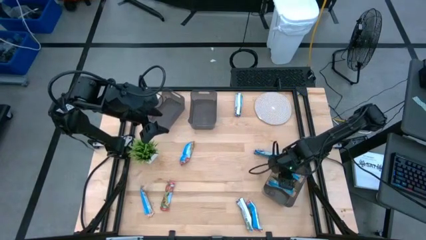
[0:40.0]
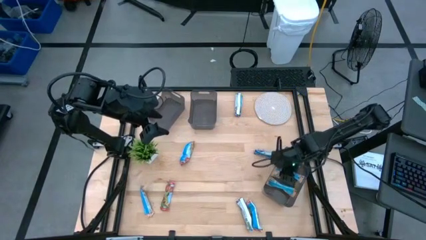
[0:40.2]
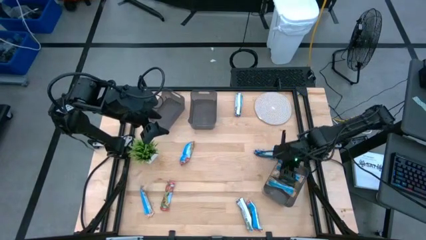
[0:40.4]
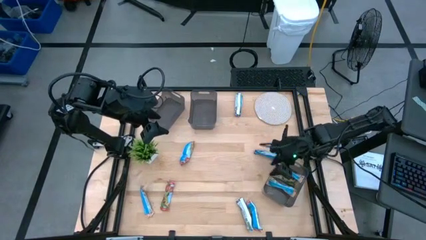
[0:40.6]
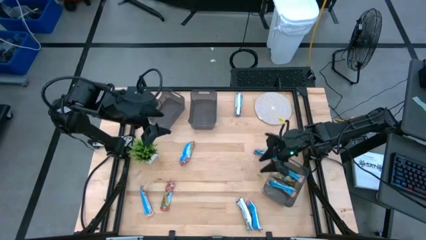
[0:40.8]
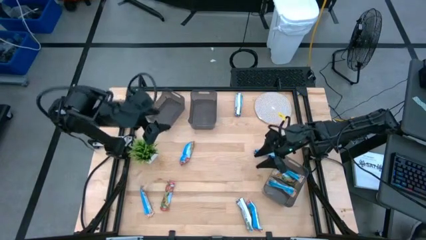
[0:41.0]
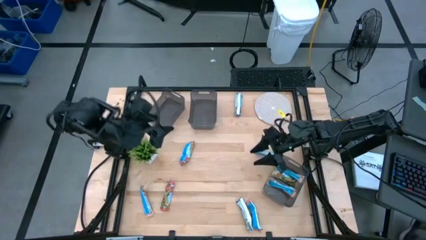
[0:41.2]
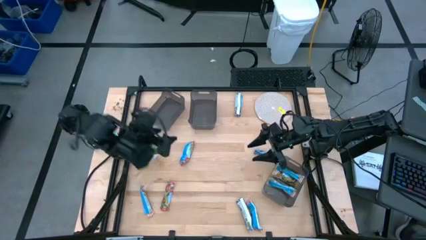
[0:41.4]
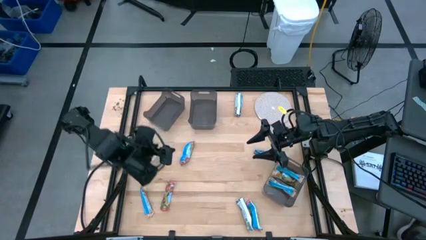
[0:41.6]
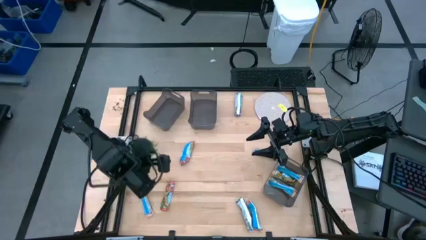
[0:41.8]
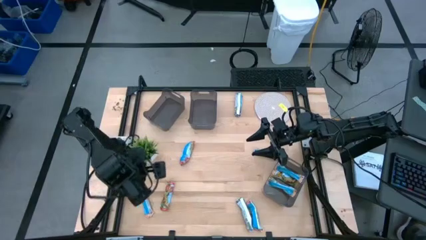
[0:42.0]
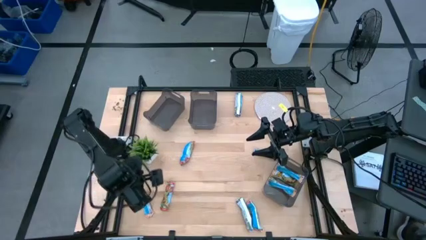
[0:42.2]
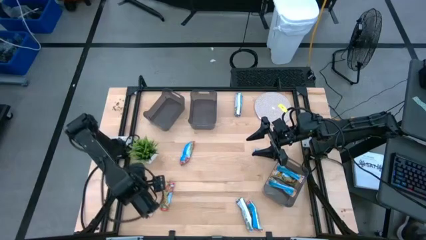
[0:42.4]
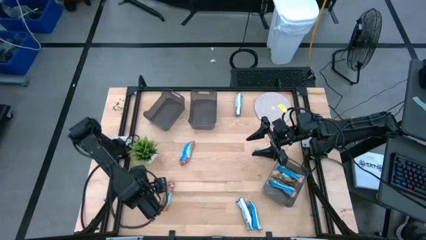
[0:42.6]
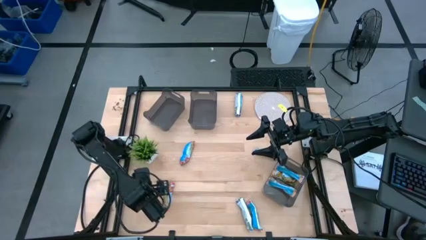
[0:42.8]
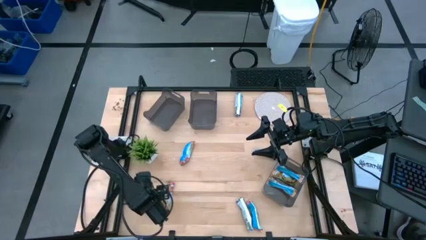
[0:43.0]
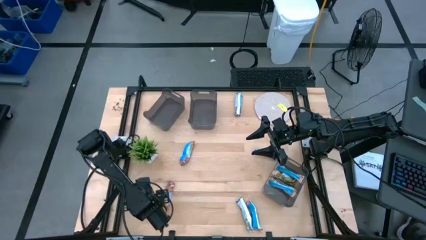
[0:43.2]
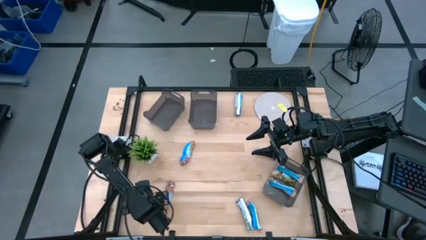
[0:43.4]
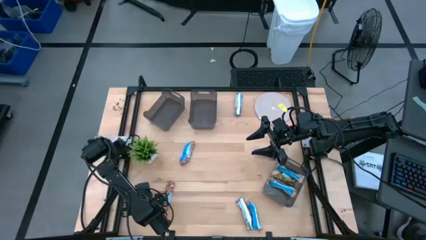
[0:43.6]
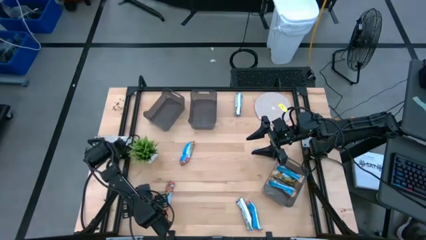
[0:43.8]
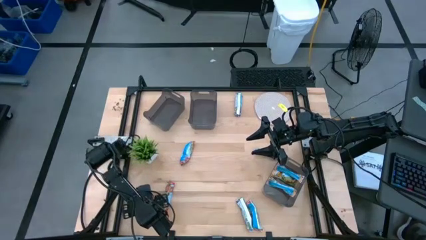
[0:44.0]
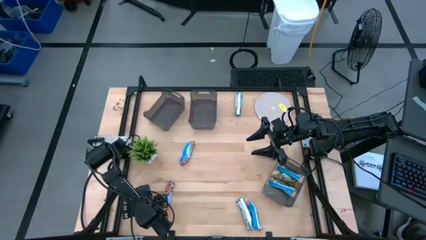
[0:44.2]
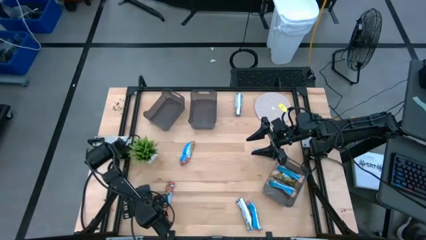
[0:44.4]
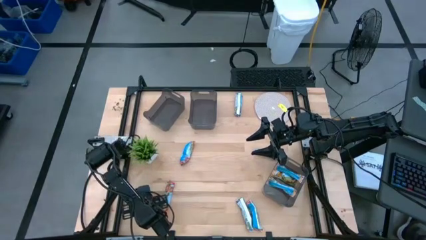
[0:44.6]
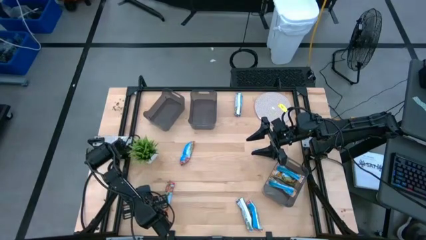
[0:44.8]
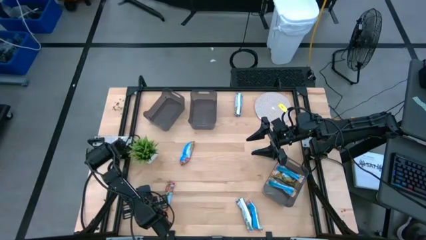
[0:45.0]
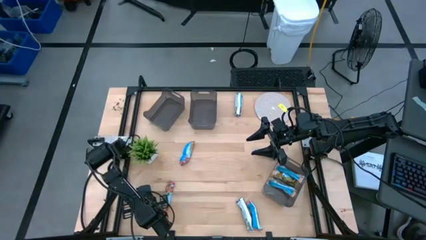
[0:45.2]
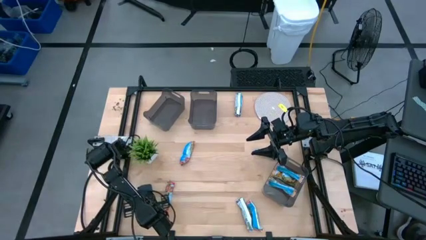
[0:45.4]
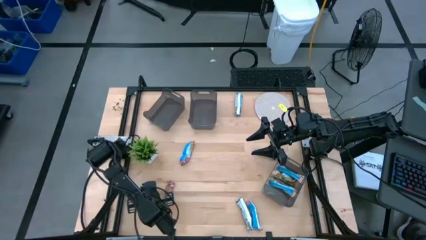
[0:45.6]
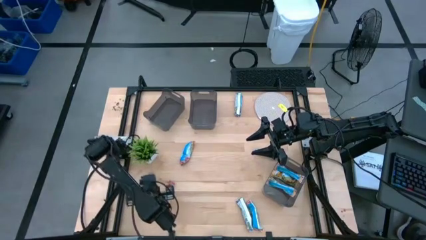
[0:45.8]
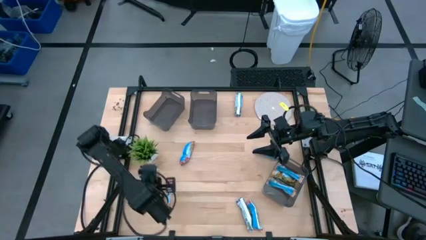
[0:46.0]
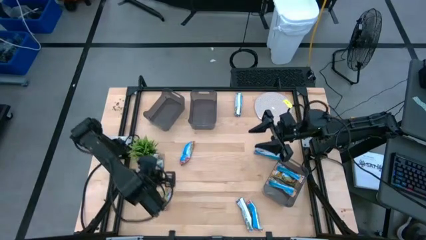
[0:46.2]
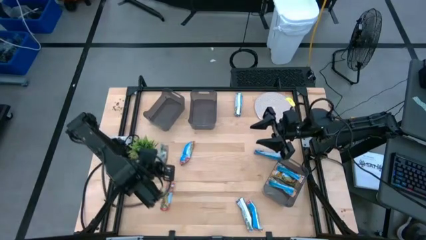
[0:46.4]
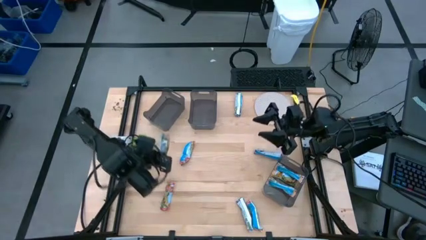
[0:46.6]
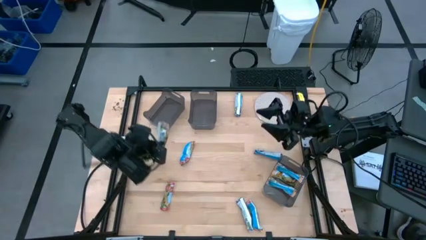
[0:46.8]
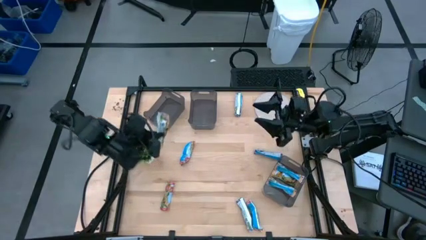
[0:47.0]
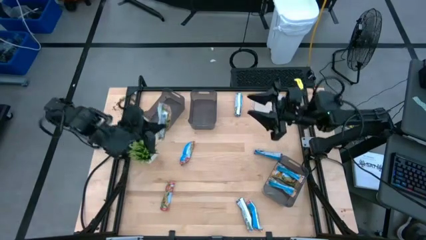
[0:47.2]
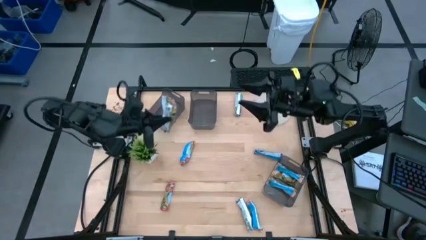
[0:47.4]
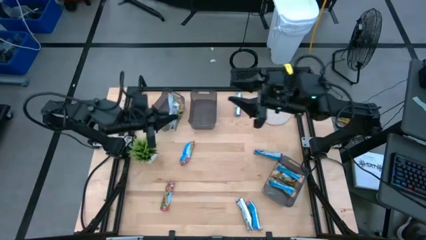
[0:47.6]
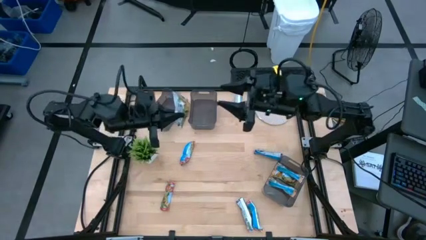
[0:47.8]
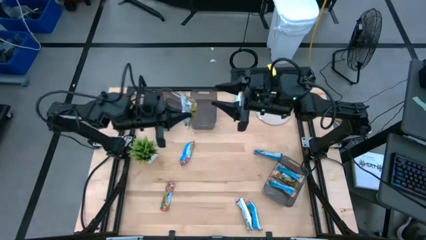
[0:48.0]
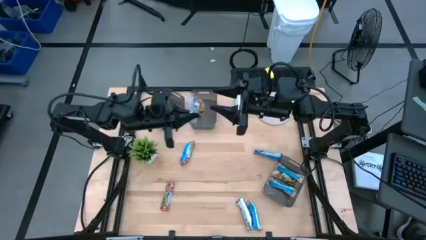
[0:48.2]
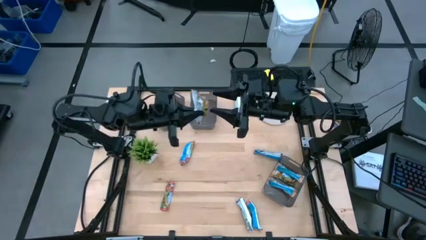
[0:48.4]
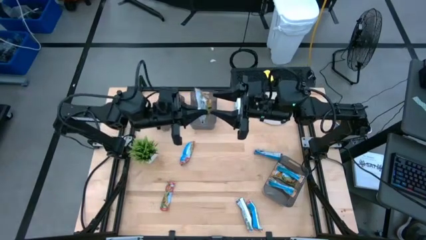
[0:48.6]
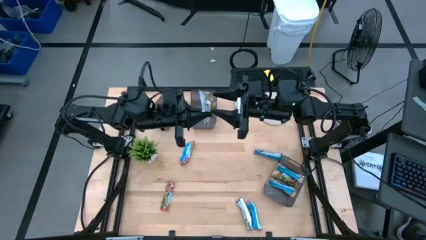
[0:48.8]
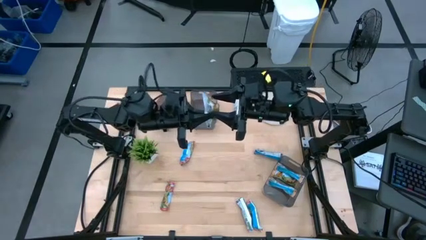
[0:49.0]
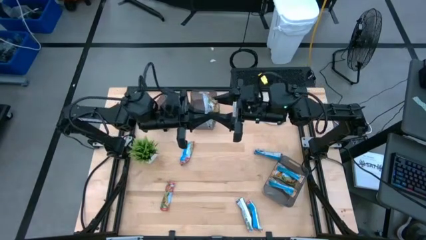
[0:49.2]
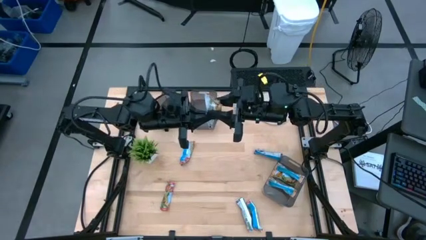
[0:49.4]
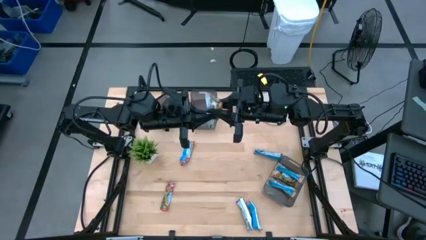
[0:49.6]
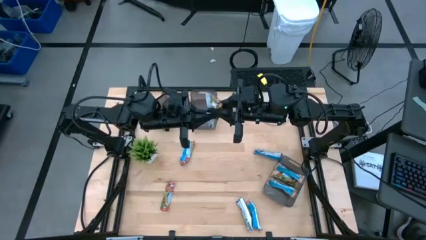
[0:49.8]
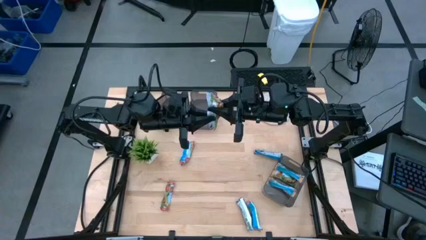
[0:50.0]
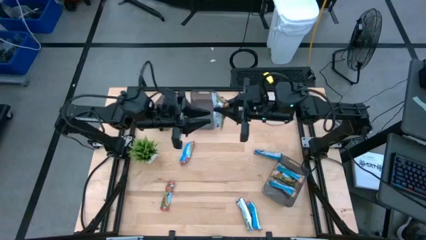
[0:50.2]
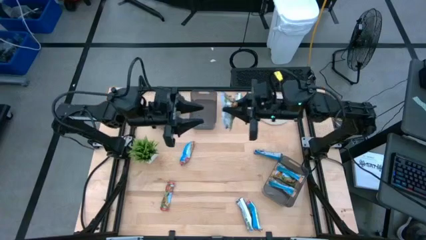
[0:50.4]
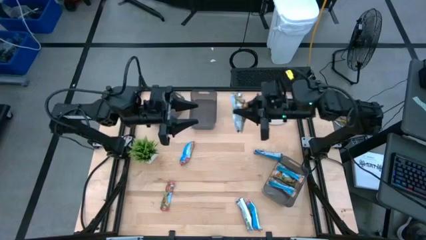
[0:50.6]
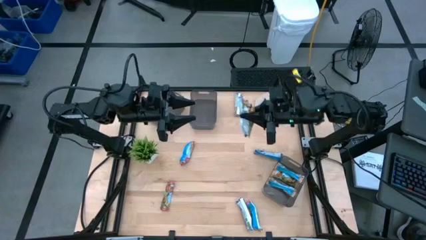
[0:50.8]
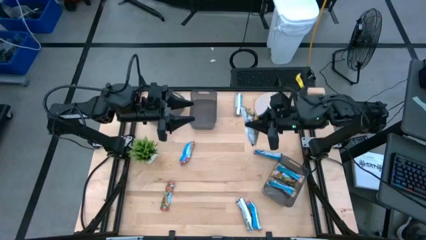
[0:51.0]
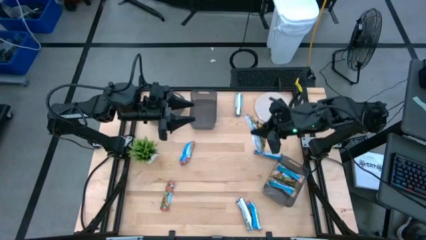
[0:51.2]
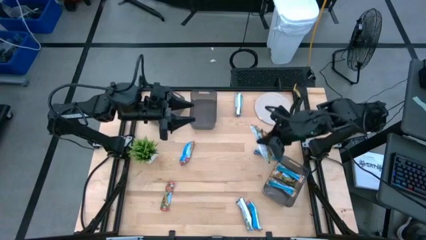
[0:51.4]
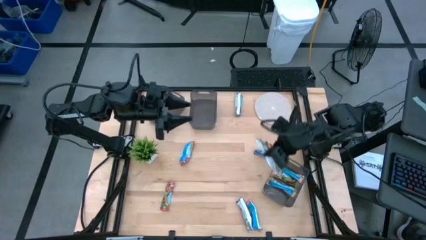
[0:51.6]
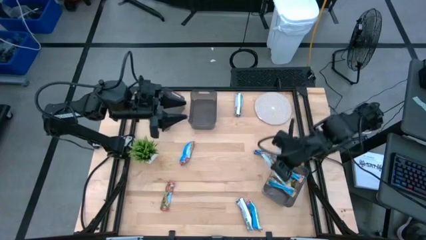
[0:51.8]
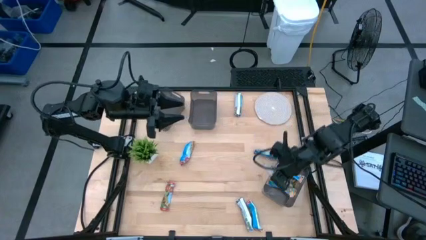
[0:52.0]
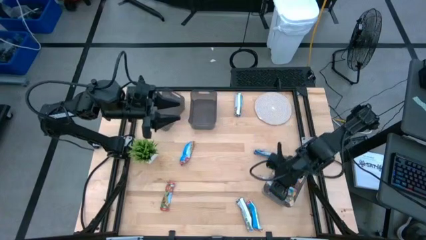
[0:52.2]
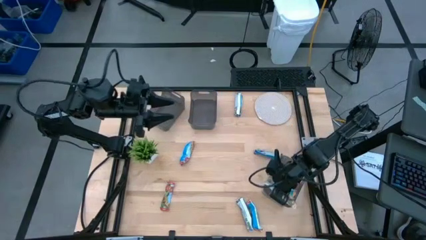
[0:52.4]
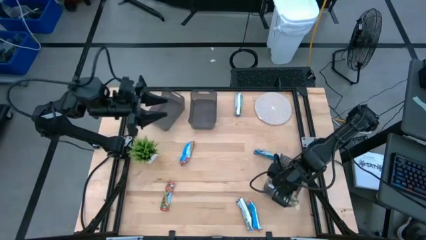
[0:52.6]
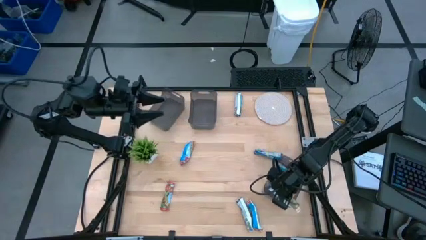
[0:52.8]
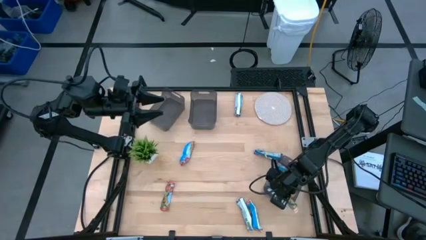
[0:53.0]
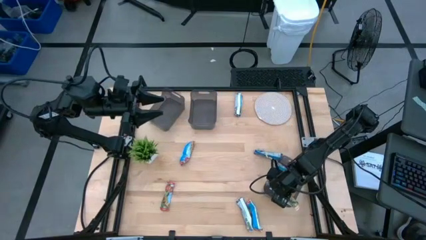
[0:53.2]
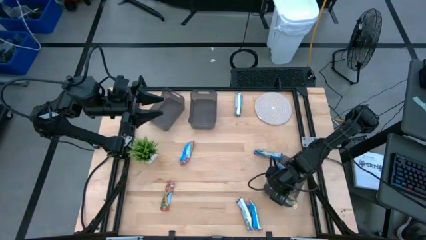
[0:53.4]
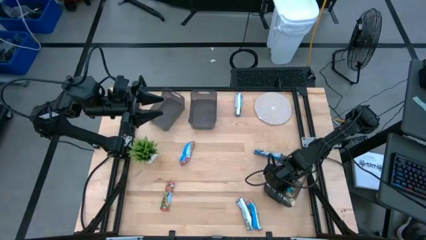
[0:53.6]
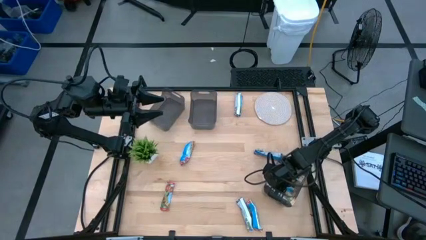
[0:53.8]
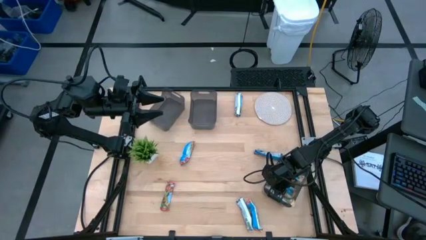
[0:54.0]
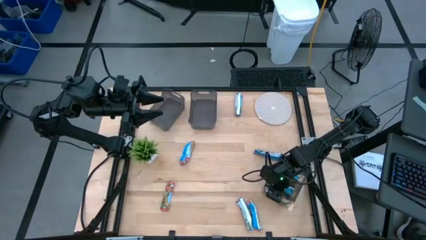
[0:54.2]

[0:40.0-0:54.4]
Task: Pick and place Granola Bars by type
Put the yellow granola bar into the bottom transparent bin
